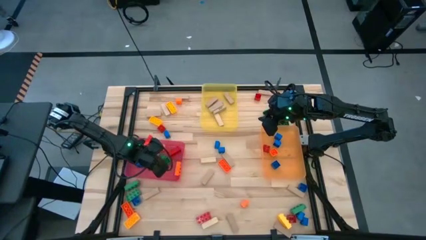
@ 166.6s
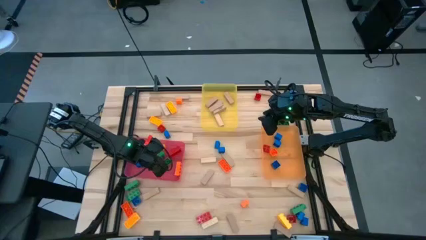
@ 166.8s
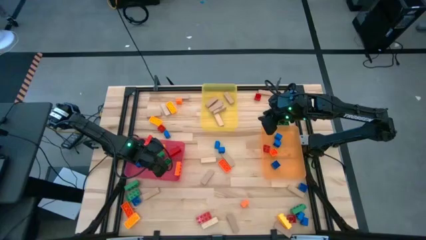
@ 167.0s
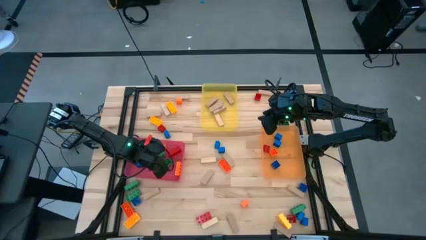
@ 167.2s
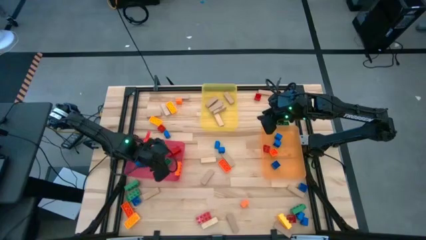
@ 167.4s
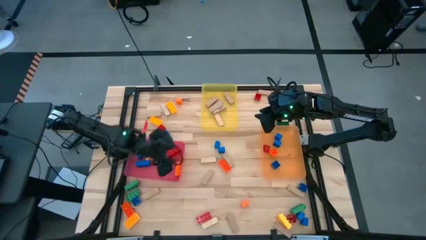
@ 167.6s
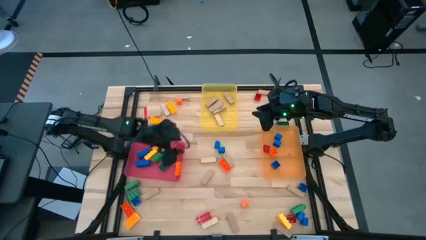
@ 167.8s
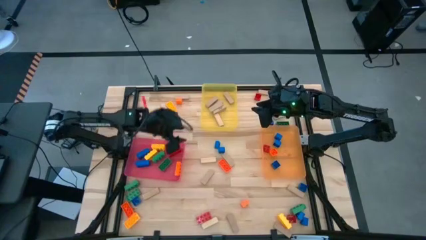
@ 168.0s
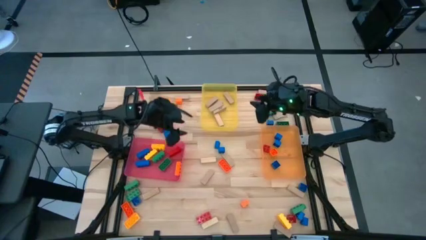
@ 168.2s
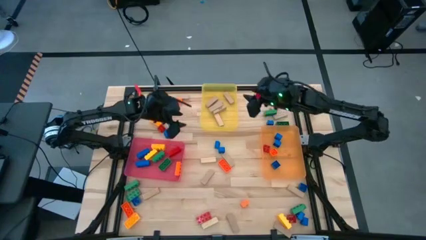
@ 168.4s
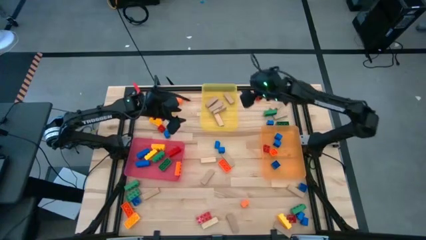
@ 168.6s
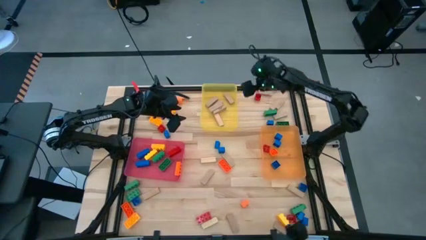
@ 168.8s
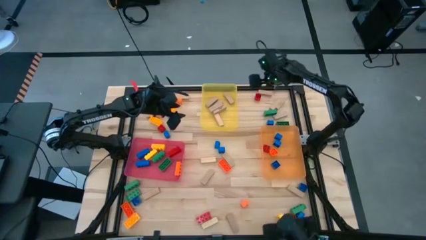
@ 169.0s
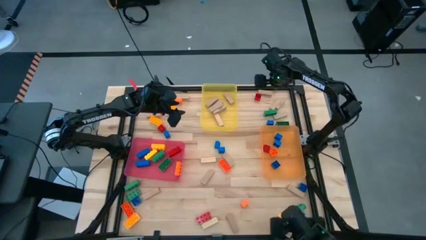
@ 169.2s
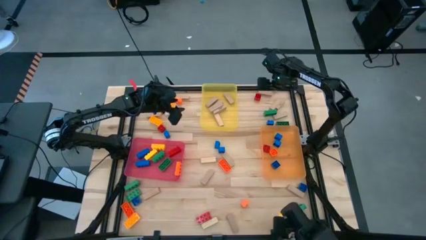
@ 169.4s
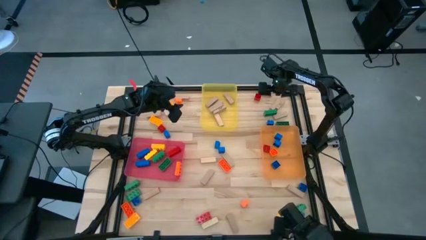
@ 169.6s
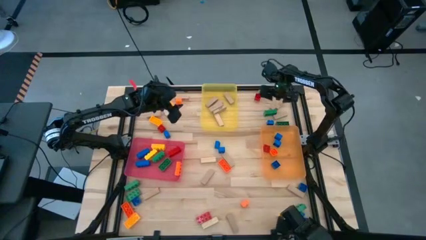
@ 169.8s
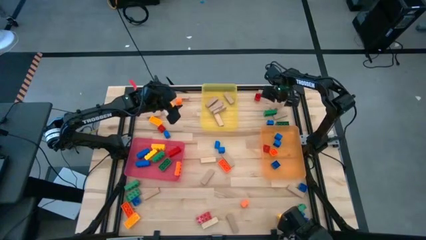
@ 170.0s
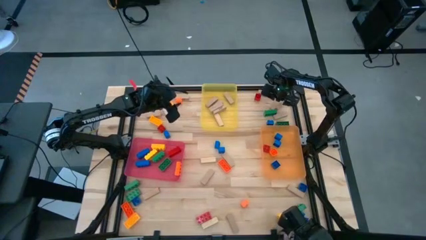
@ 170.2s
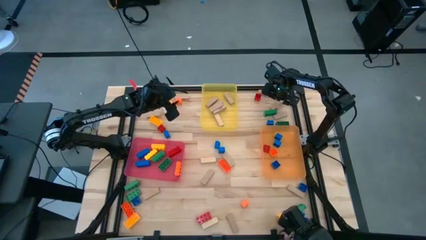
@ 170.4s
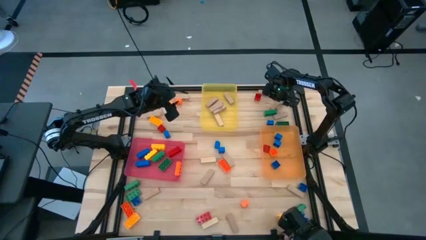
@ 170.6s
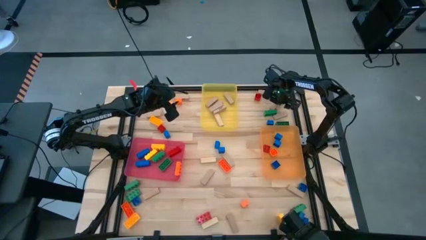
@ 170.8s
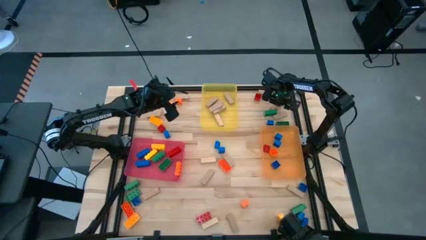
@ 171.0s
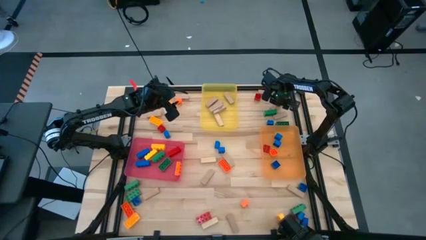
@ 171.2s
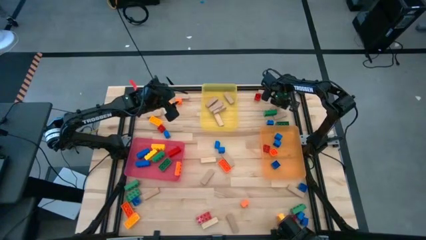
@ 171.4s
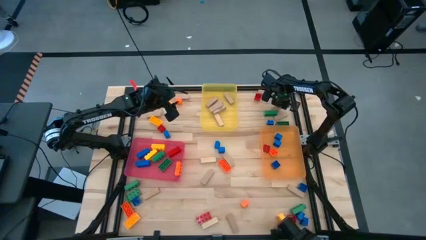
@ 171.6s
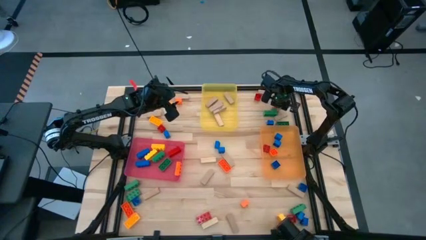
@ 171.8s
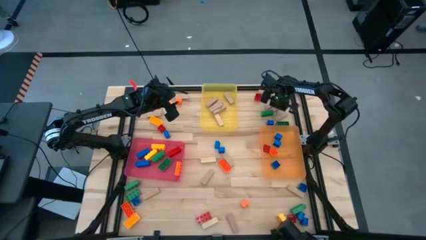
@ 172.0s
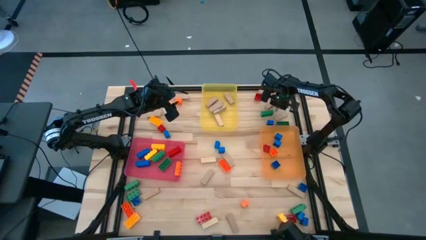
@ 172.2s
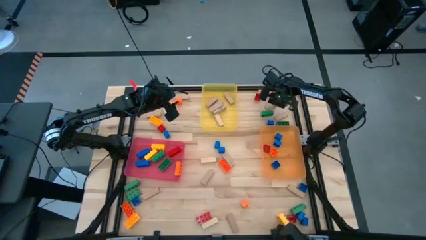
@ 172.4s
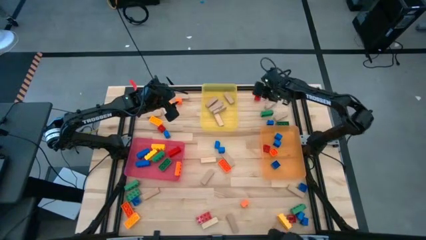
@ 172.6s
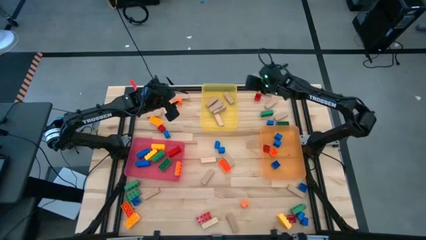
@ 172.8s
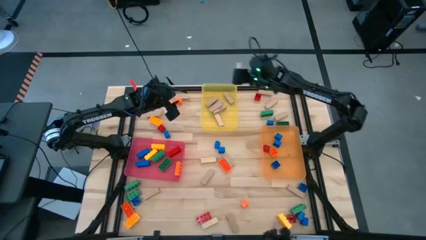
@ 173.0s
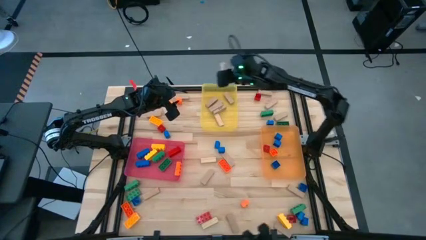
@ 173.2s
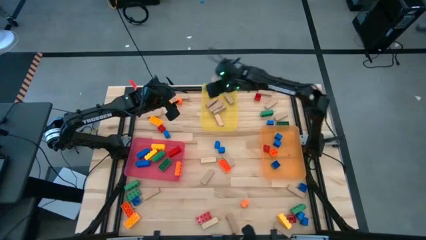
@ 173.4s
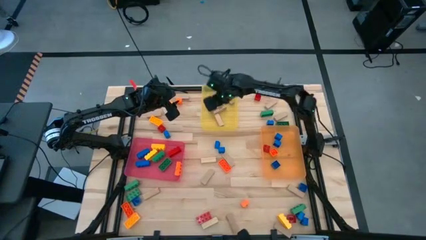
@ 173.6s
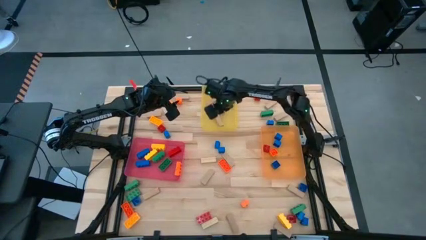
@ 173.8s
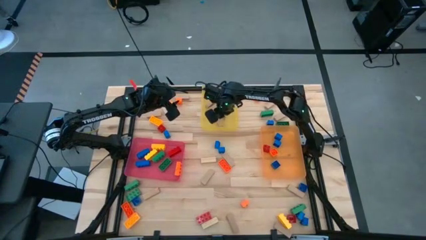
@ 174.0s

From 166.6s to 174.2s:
Task: Sort blocks by size
Put the wooden block into the yellow bin

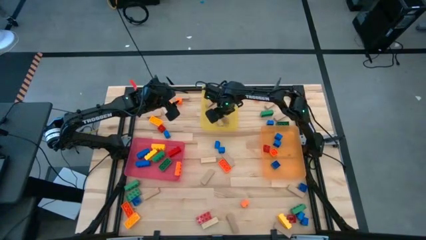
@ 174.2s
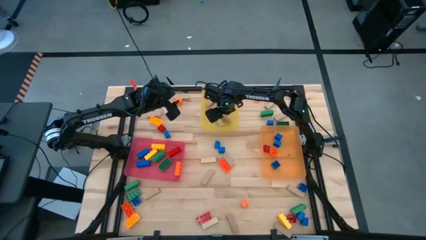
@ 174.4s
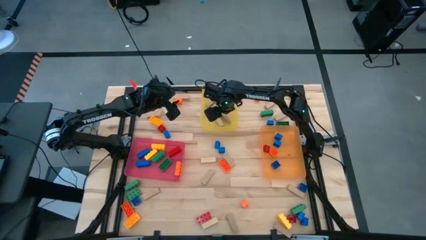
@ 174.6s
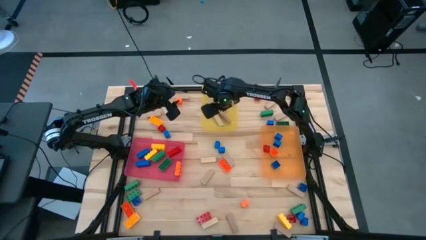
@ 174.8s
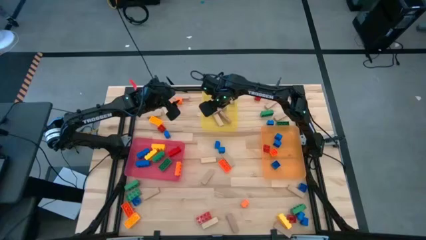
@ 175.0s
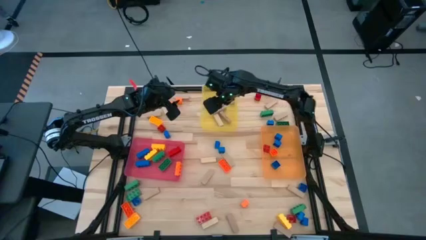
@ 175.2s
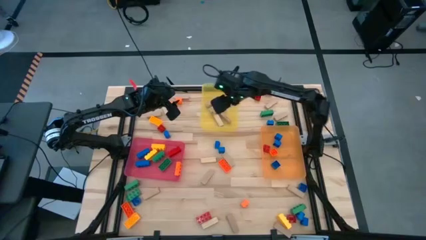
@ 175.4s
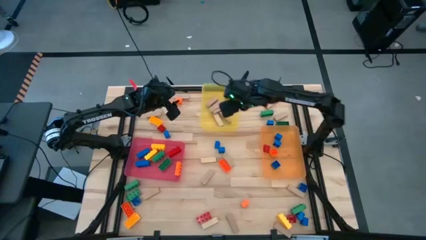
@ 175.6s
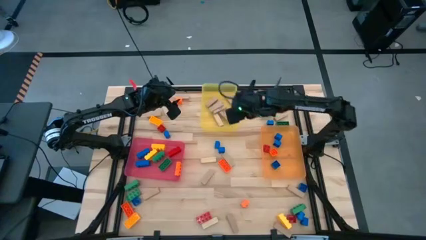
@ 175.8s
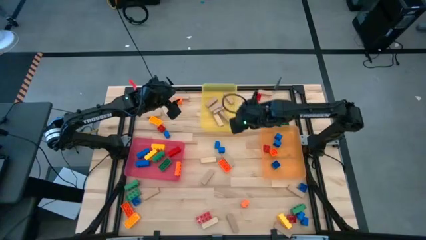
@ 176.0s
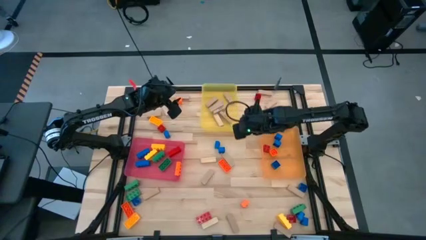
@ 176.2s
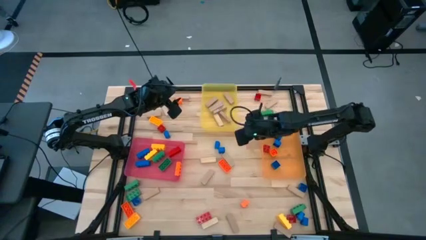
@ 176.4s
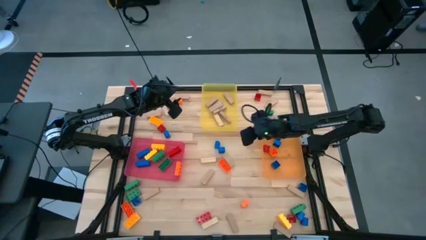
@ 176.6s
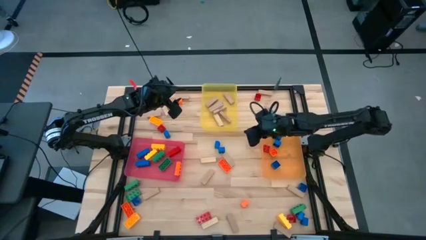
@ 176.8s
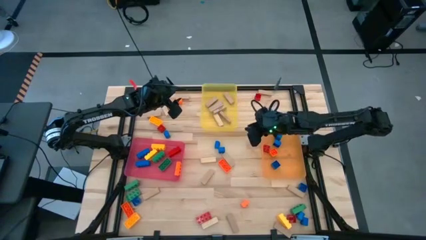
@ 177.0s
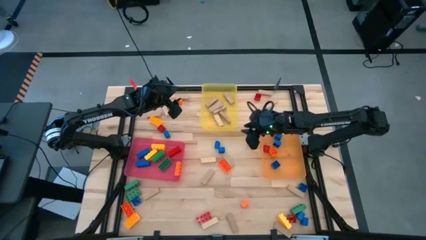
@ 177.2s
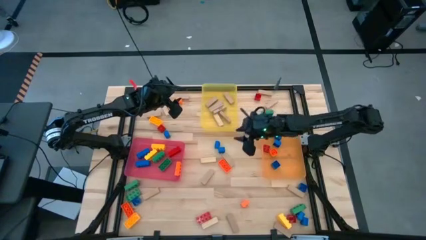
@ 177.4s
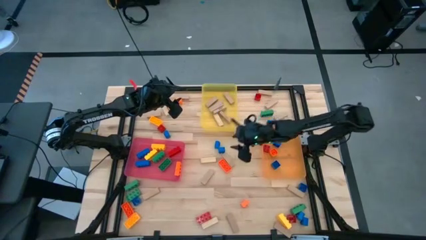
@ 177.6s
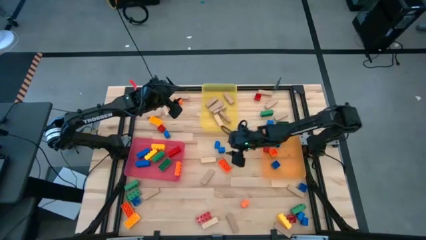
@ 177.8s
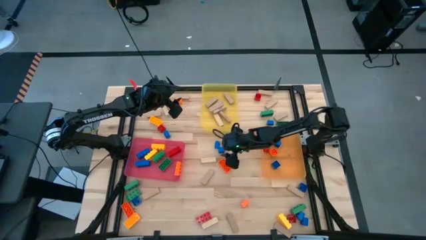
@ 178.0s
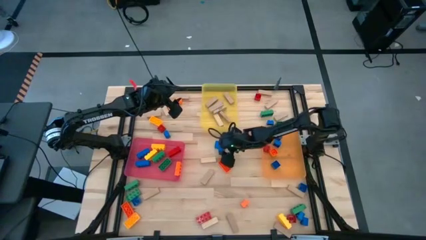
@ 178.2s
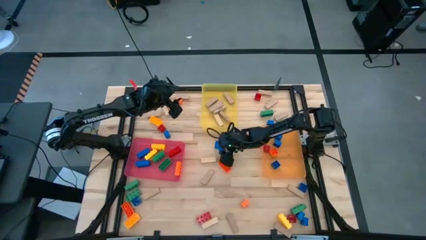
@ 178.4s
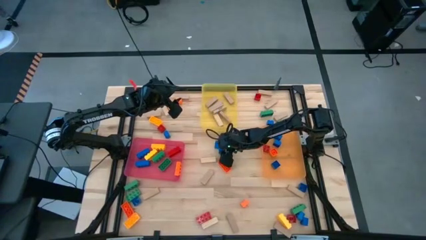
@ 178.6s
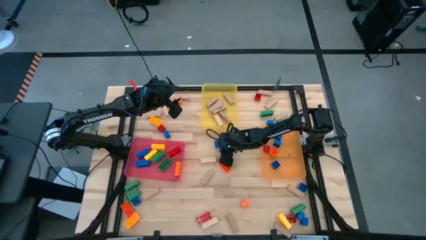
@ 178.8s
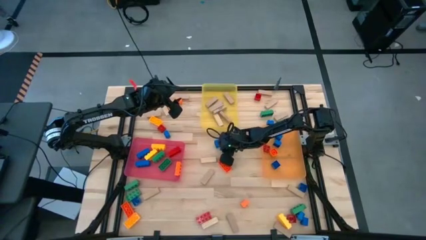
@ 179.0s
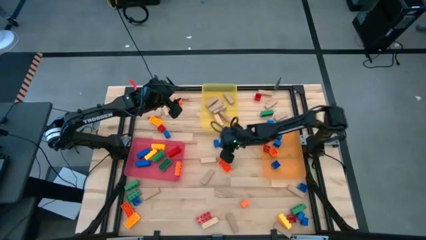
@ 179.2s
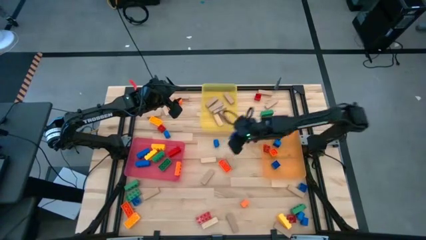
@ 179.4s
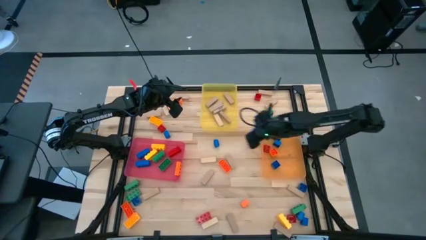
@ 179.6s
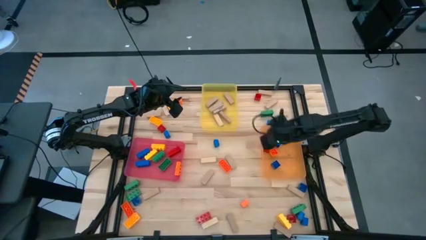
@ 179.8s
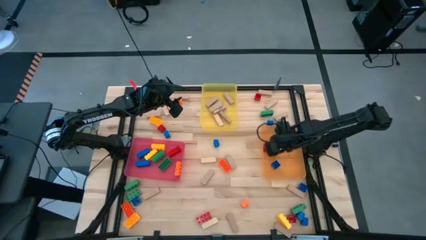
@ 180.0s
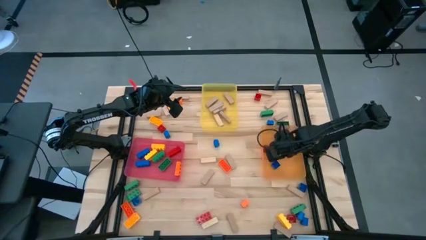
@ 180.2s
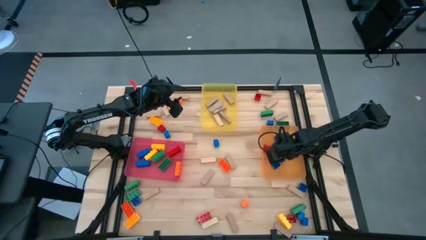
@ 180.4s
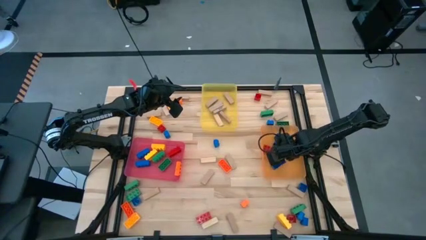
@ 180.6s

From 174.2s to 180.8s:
Put the 1 stud blue game piece into the orange bin

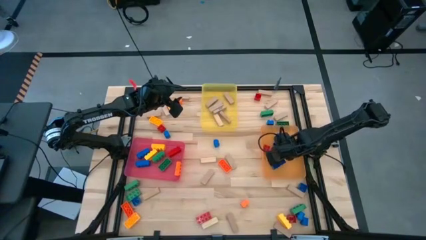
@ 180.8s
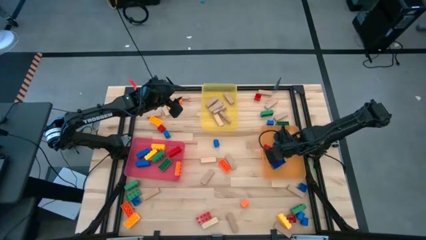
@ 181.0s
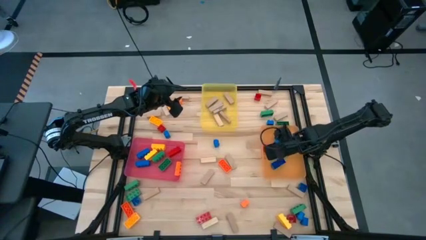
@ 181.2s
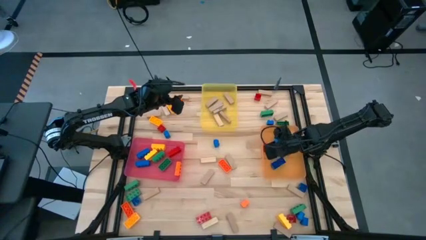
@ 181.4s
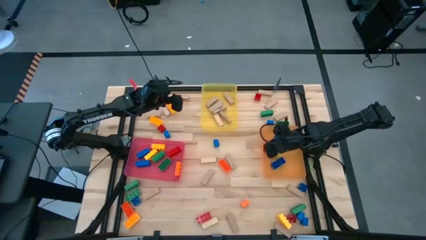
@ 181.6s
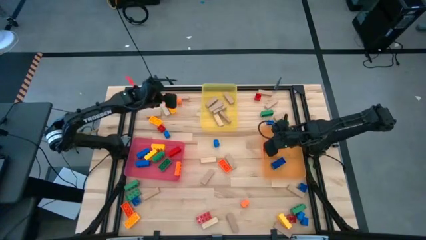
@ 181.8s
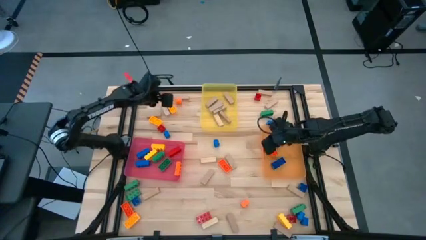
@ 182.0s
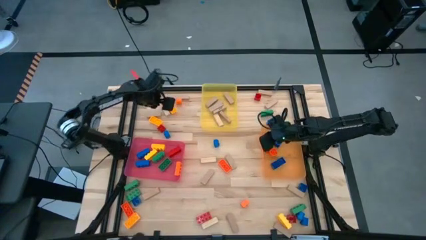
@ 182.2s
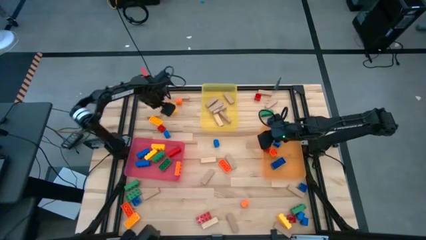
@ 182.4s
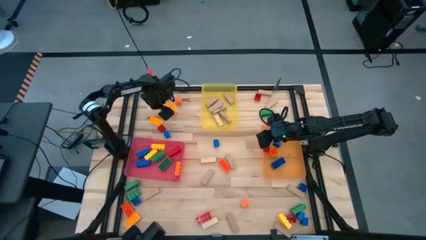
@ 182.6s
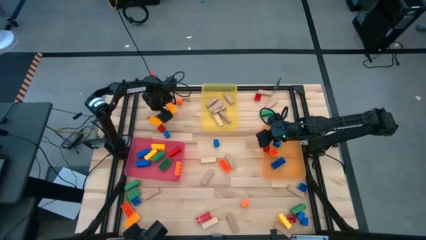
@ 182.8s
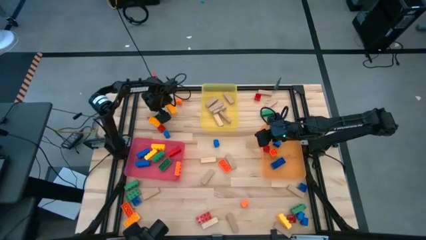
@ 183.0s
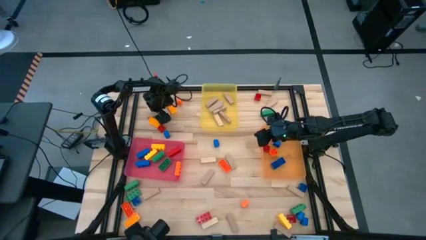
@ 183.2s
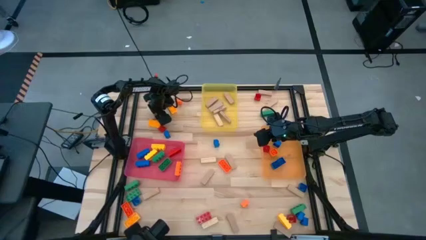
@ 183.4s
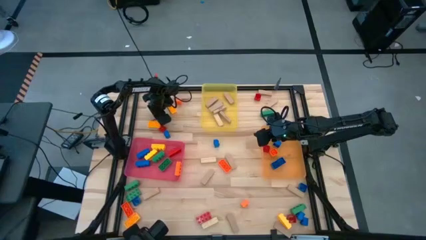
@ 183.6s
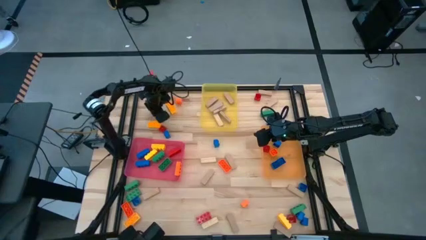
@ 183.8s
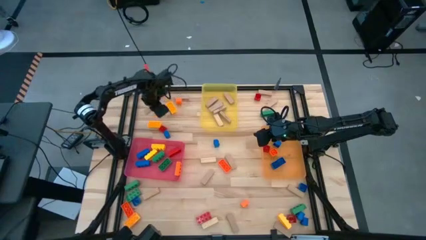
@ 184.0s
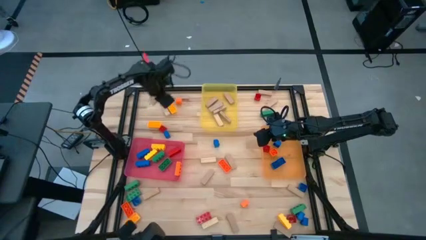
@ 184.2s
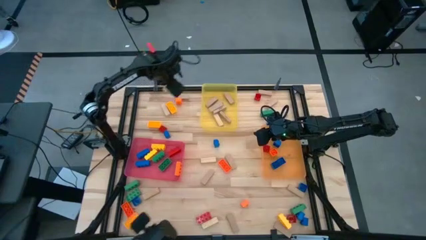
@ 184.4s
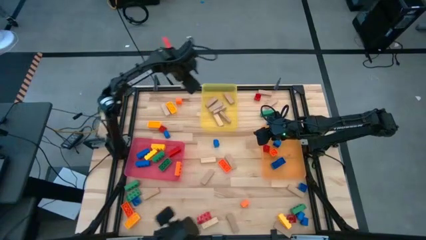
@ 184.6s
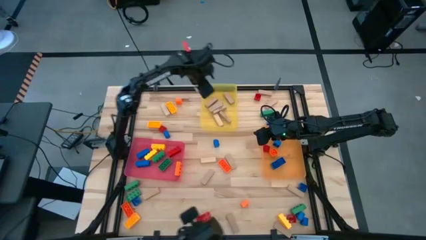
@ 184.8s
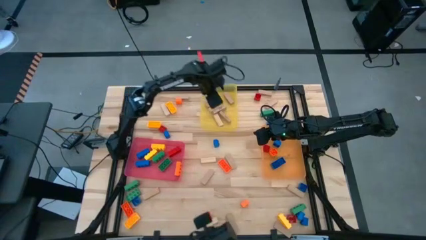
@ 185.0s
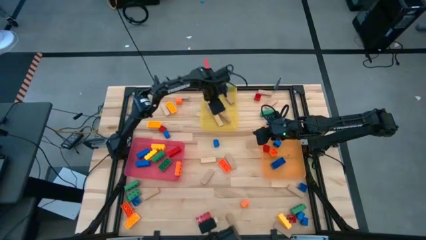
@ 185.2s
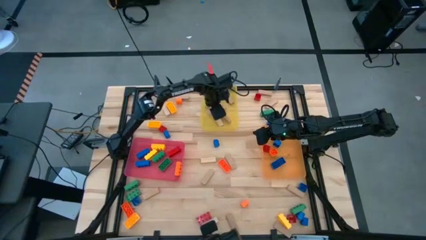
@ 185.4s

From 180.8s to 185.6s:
Put the wooden block into the yellow bin
